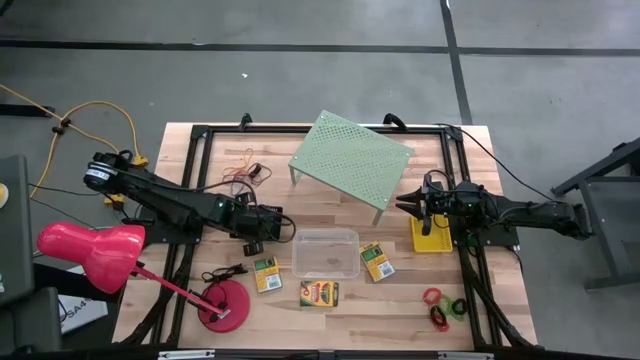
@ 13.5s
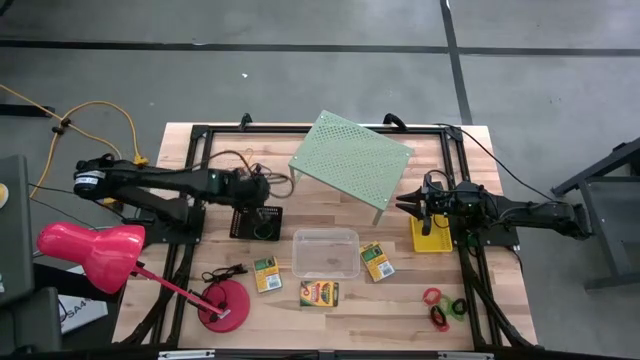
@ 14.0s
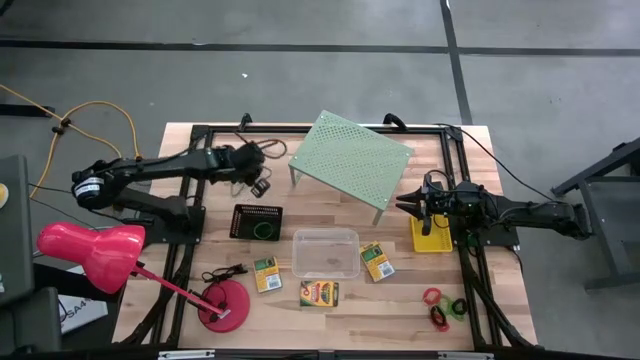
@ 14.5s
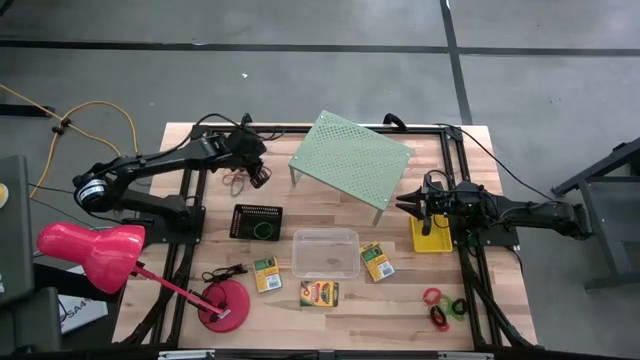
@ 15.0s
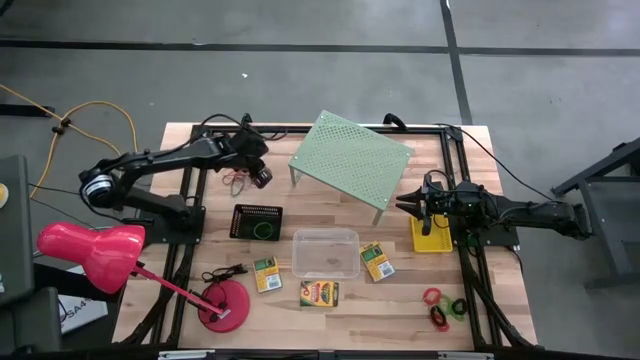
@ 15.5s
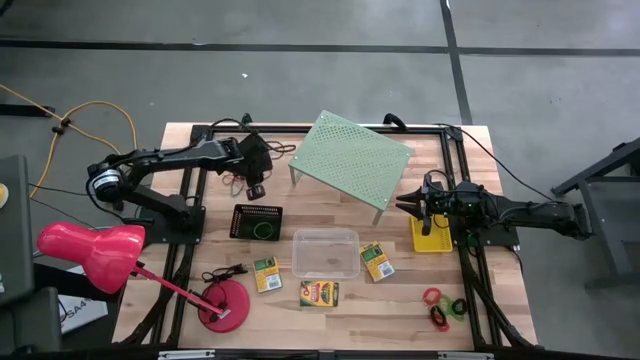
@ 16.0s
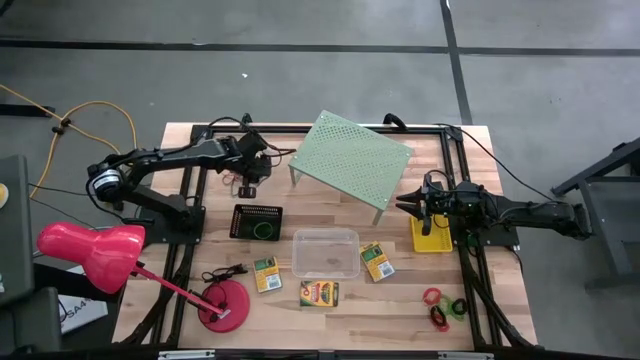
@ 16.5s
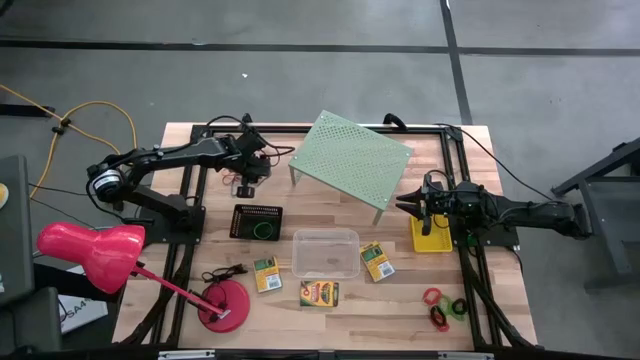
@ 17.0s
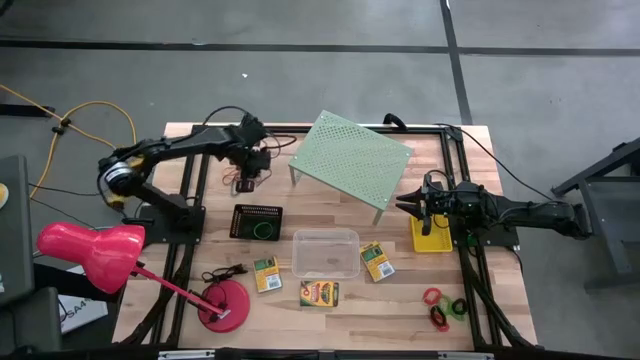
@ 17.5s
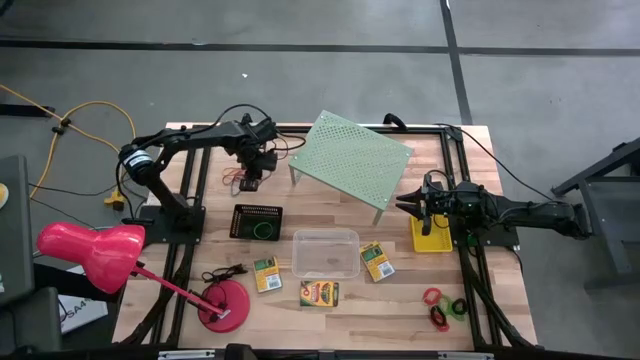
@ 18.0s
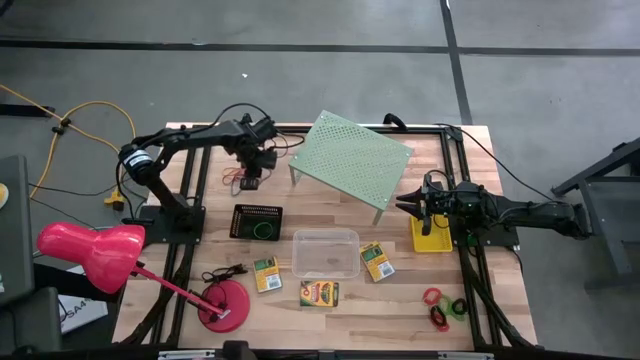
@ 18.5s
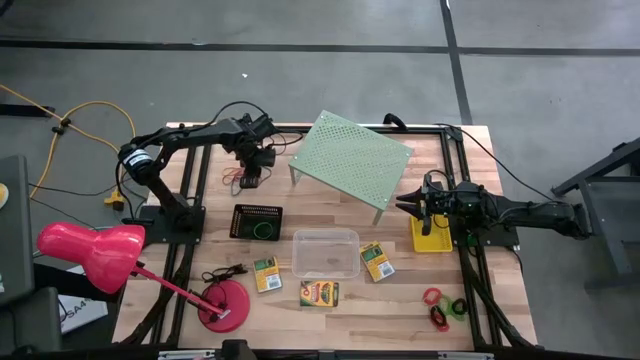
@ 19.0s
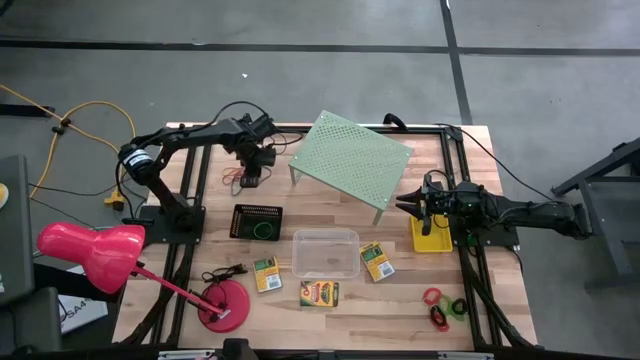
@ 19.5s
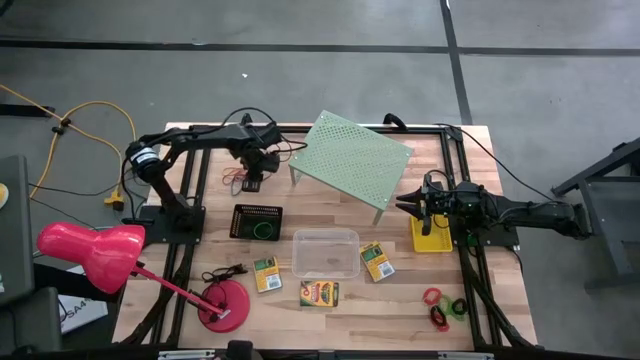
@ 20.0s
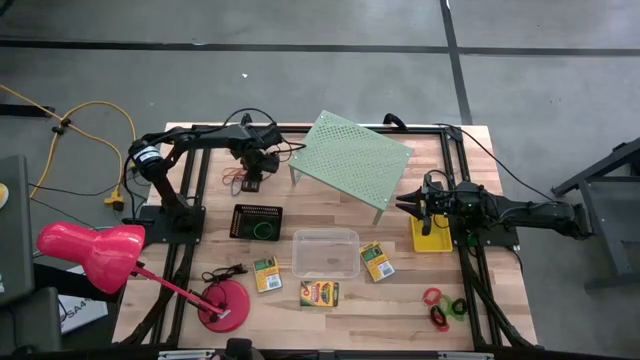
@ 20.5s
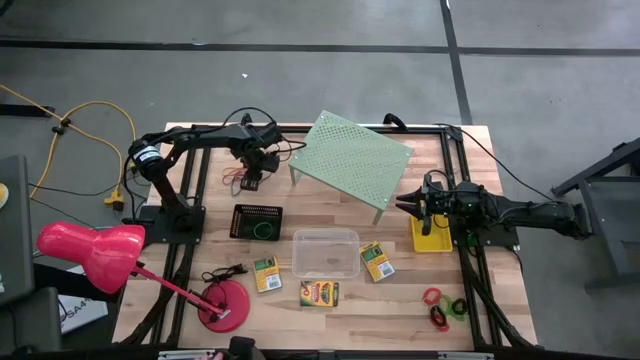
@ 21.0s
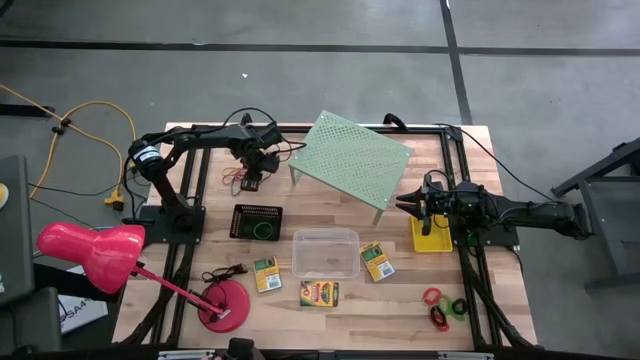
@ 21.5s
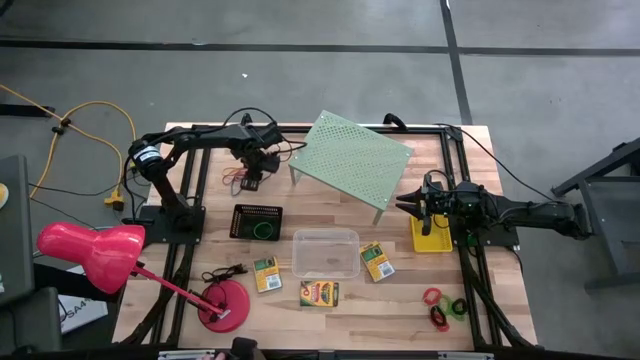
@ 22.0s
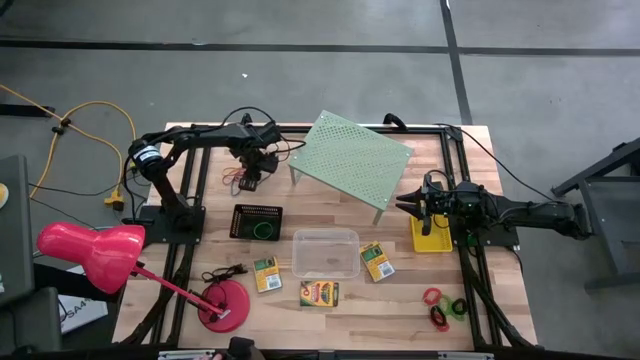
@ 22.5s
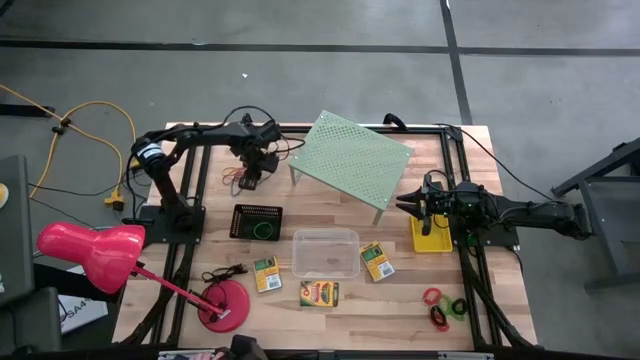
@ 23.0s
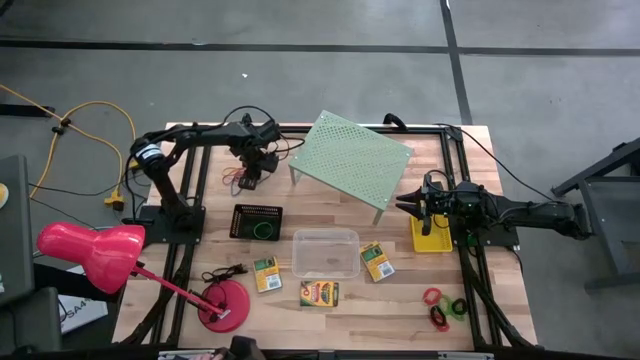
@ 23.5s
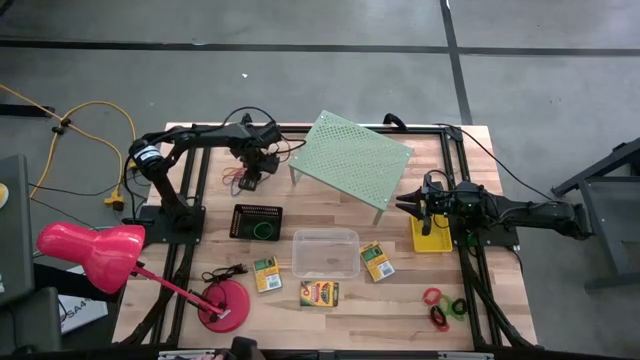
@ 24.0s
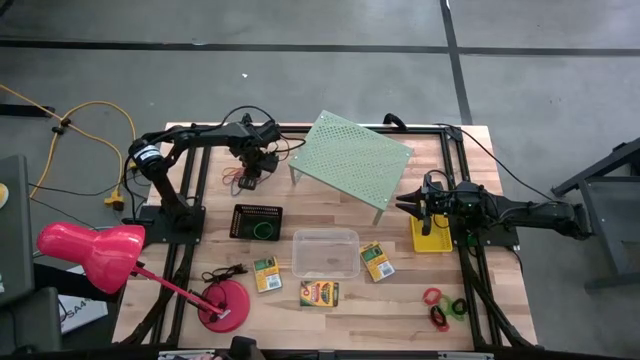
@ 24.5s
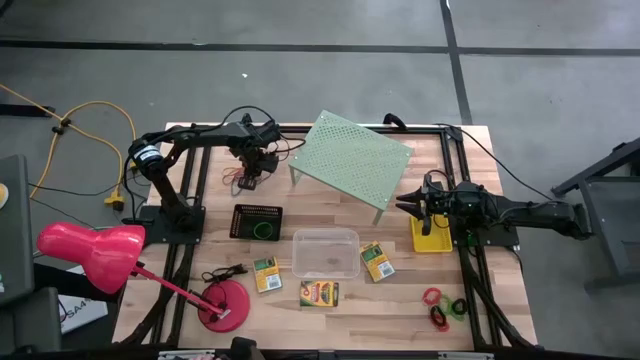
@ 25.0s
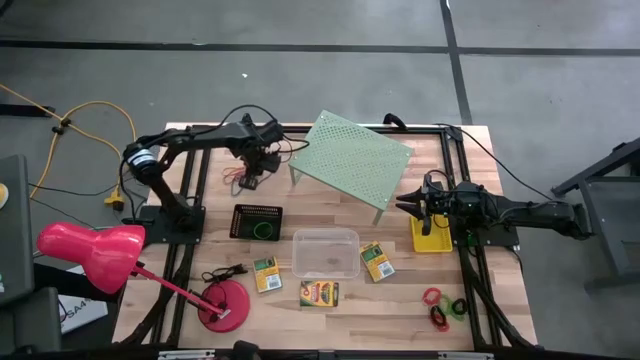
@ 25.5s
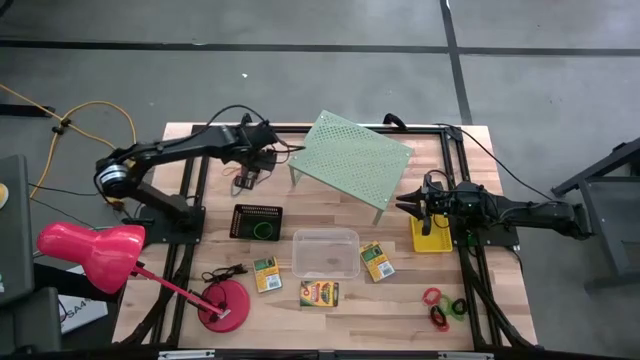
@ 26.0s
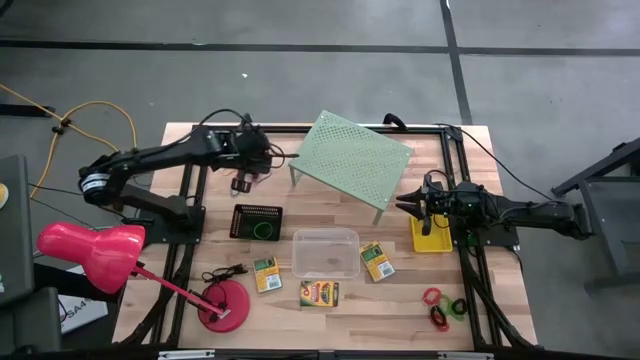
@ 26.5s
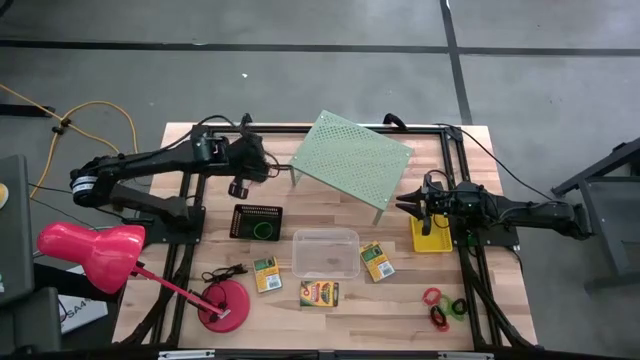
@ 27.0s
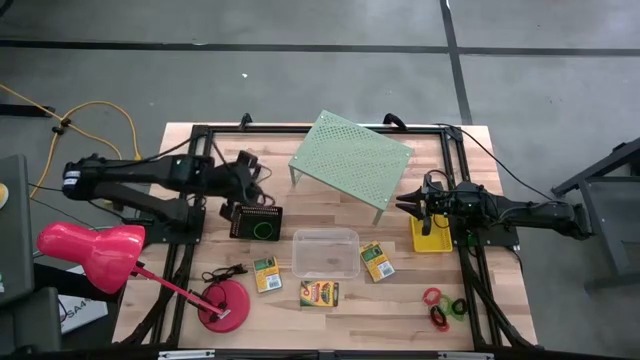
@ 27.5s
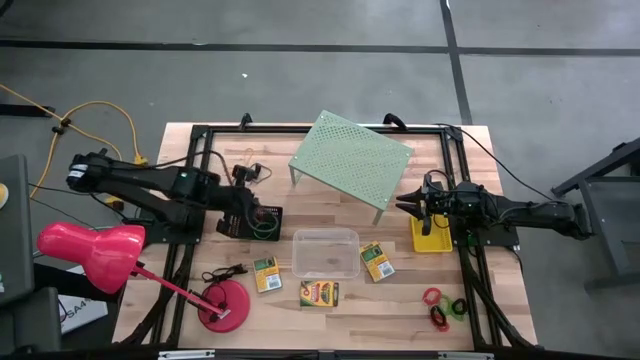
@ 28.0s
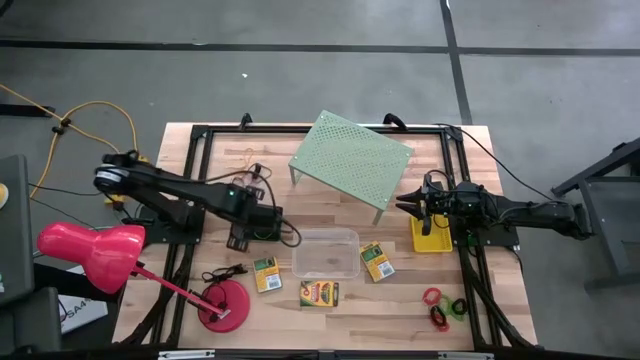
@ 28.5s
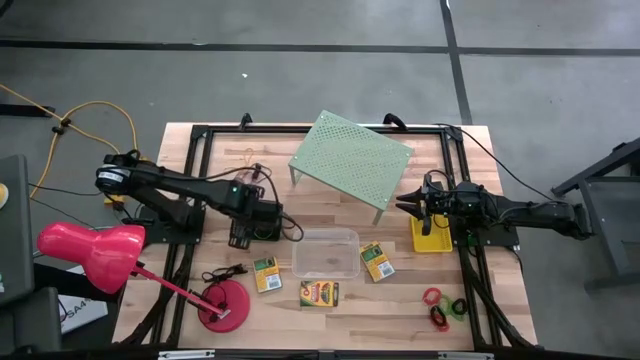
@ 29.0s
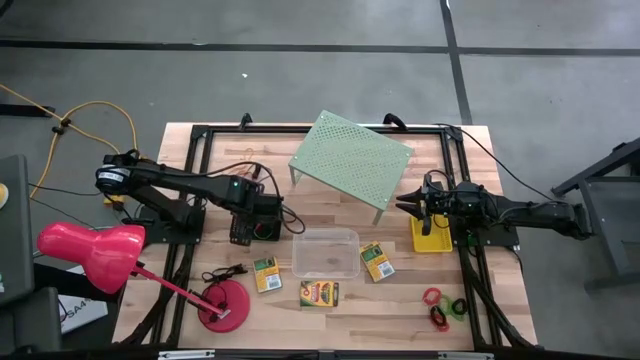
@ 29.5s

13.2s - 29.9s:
Task: Pick & Place Office Desk Supplies
Put the red rubber band into the black bin

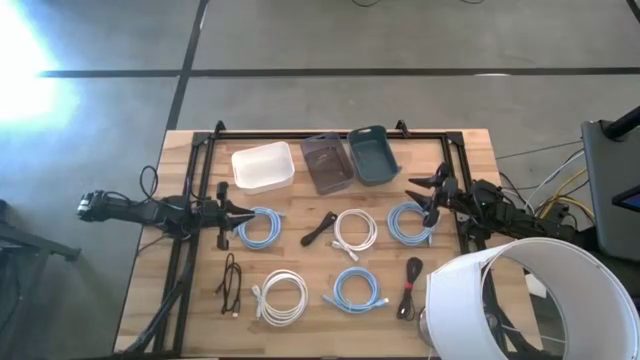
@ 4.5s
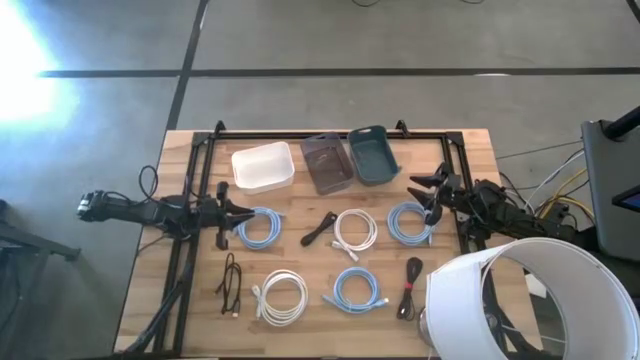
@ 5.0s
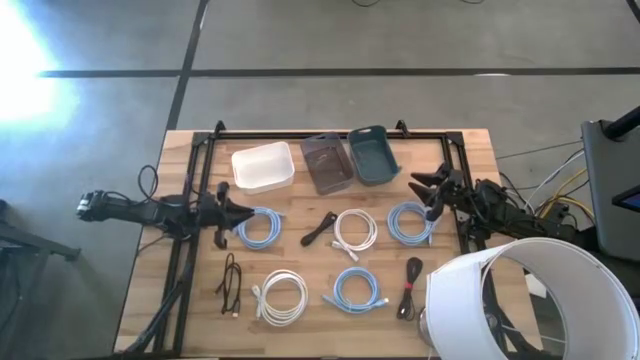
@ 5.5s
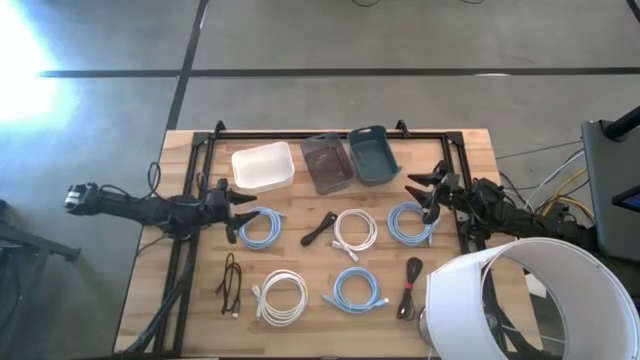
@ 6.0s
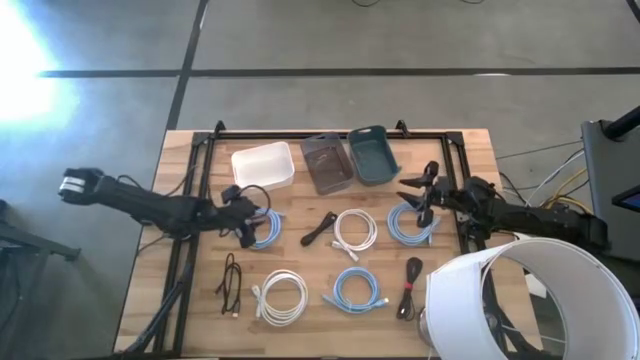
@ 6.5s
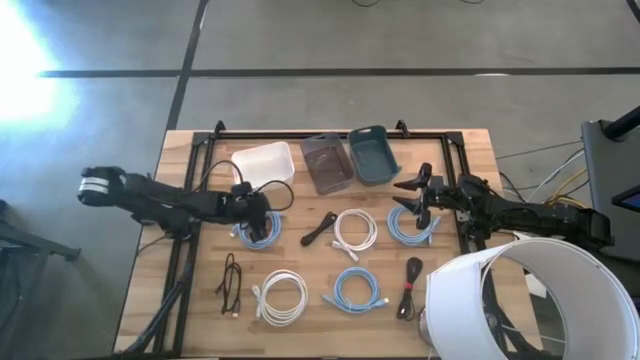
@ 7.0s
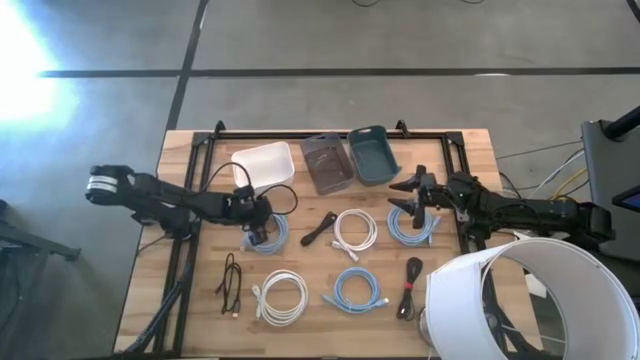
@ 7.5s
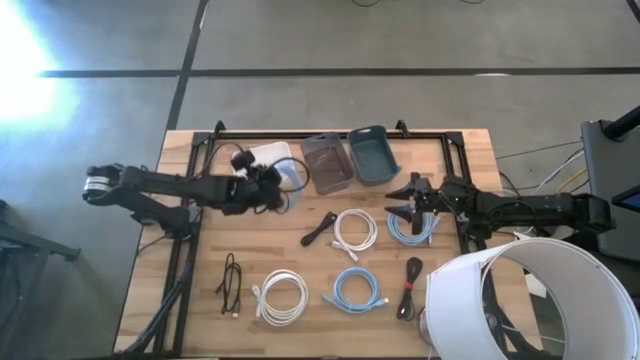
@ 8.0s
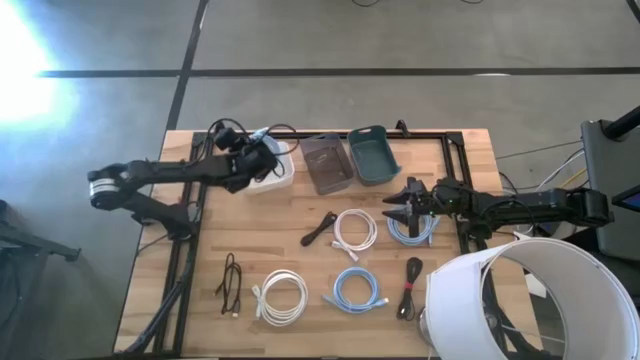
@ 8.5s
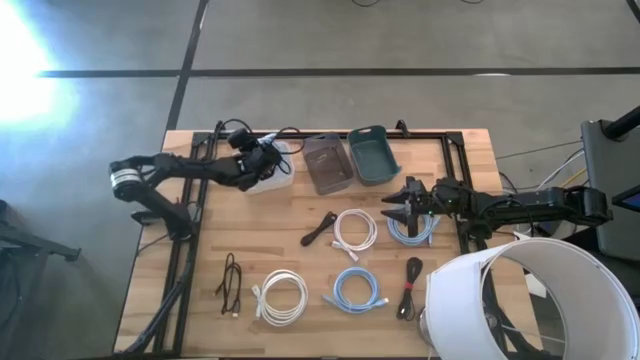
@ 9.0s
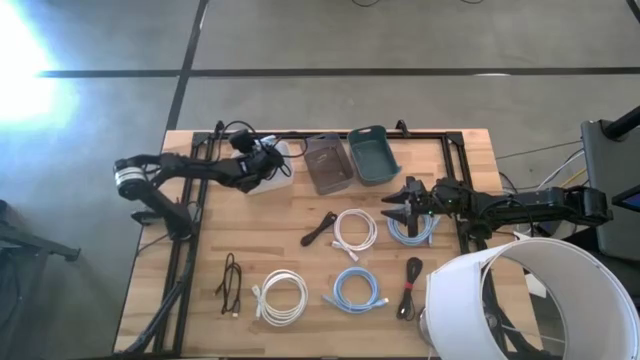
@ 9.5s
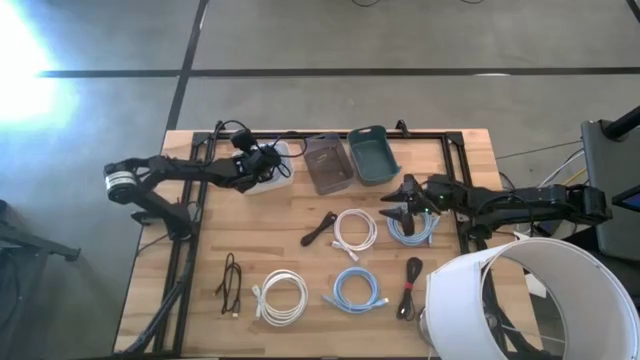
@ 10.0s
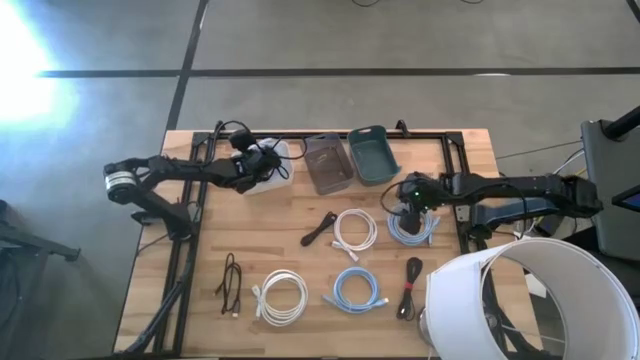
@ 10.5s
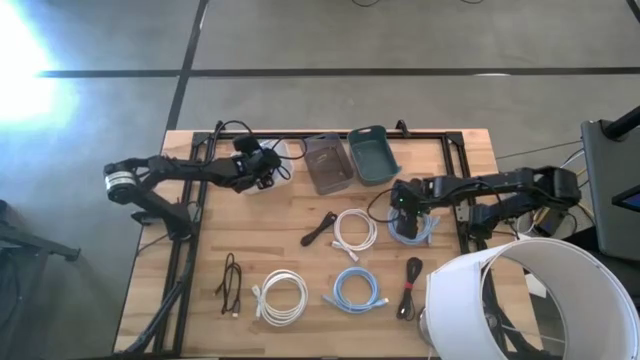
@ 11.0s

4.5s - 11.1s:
Task: Pick & Place USB Port
Put the top left blue USB cable into the white bin
